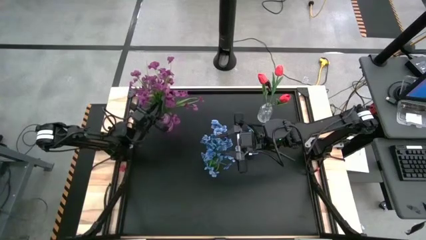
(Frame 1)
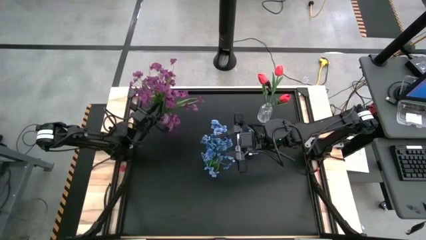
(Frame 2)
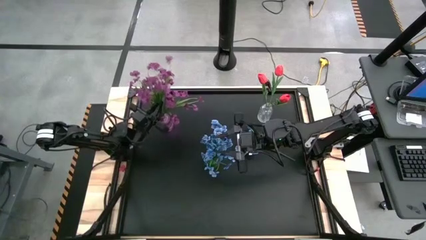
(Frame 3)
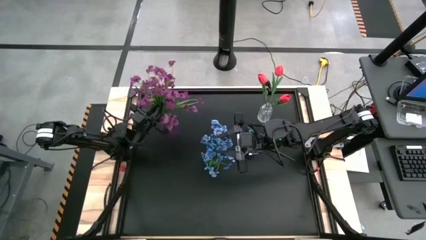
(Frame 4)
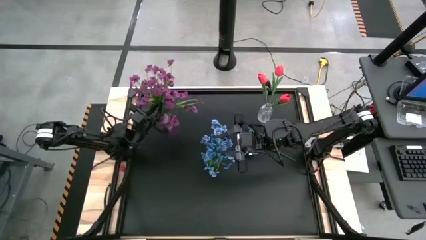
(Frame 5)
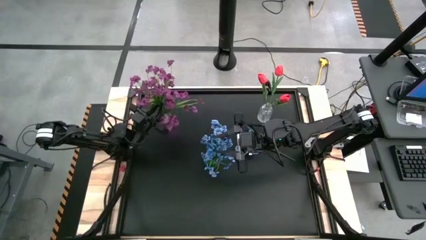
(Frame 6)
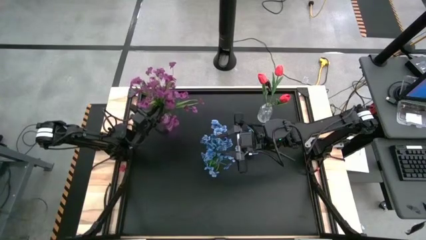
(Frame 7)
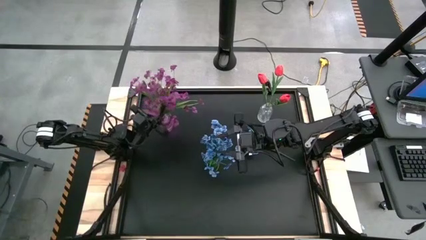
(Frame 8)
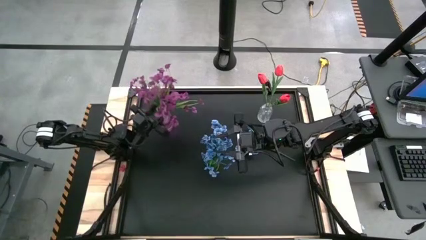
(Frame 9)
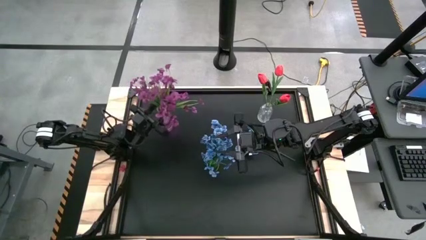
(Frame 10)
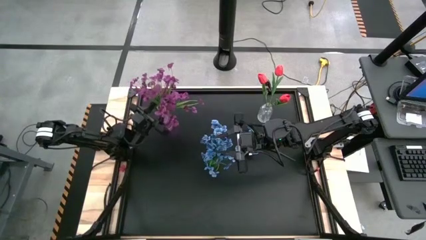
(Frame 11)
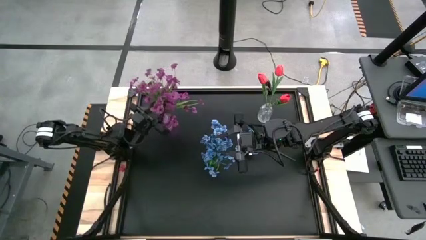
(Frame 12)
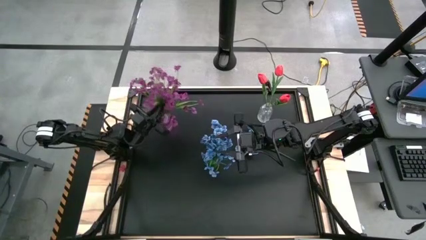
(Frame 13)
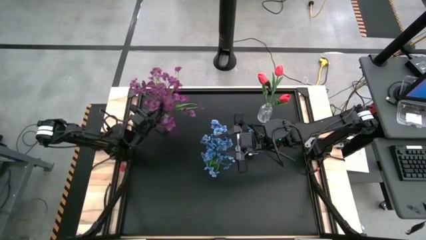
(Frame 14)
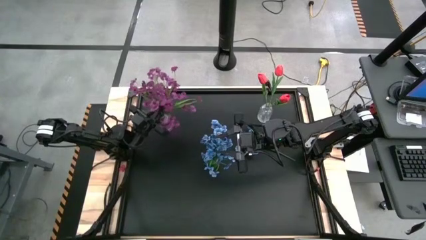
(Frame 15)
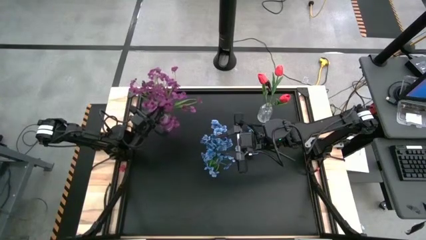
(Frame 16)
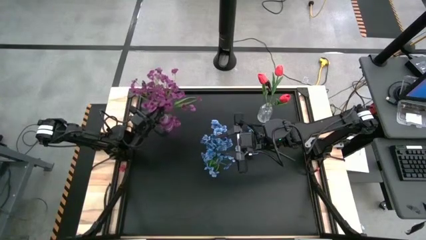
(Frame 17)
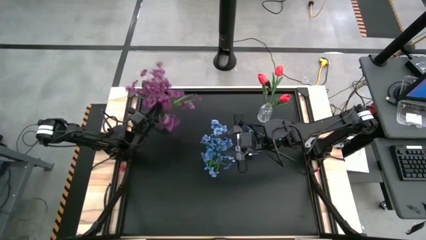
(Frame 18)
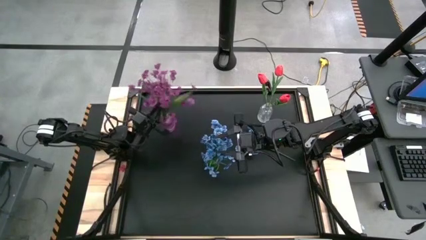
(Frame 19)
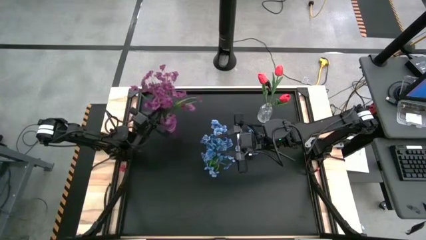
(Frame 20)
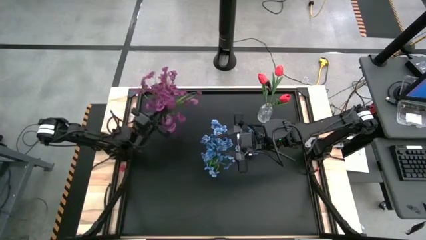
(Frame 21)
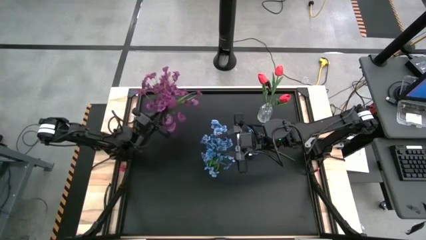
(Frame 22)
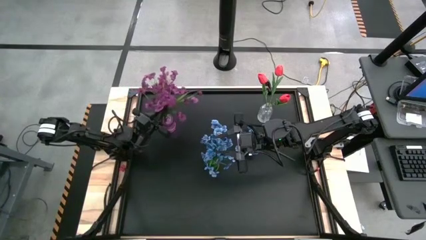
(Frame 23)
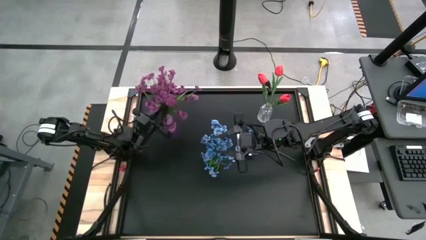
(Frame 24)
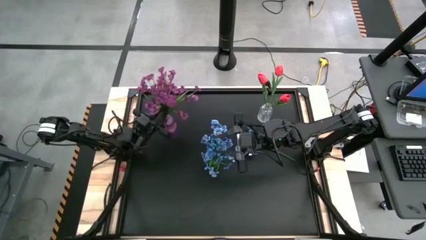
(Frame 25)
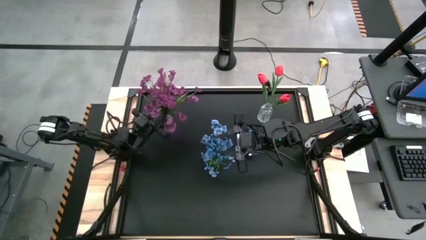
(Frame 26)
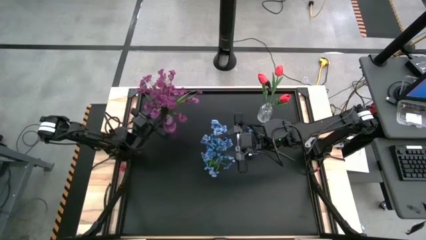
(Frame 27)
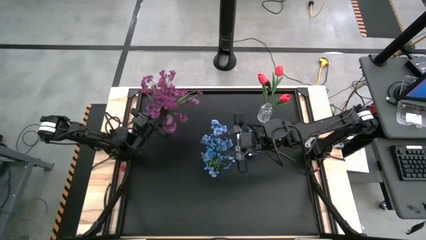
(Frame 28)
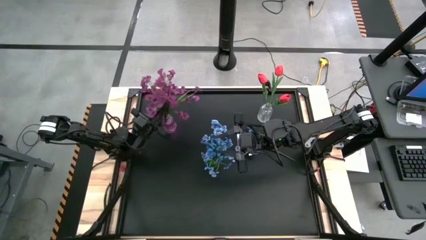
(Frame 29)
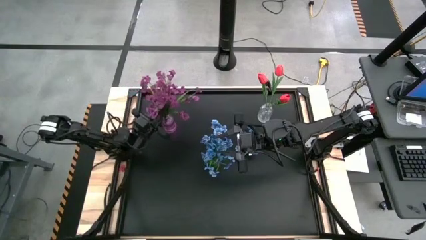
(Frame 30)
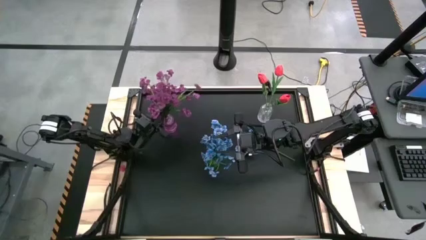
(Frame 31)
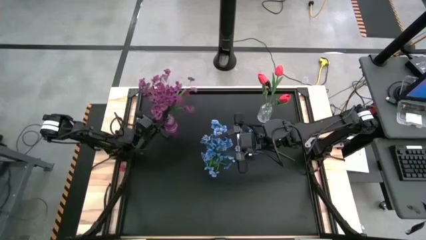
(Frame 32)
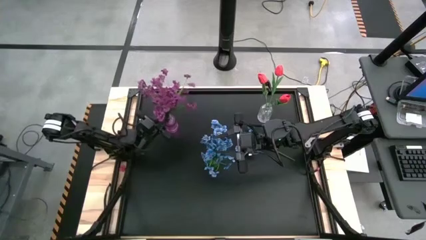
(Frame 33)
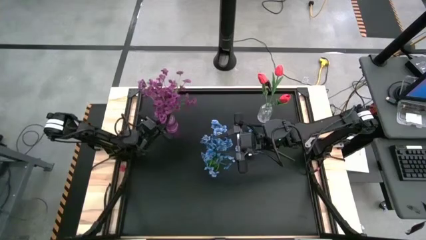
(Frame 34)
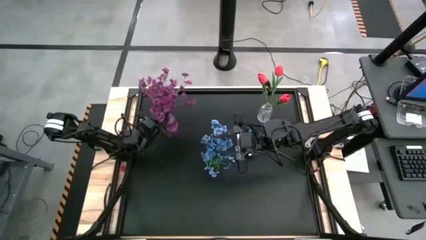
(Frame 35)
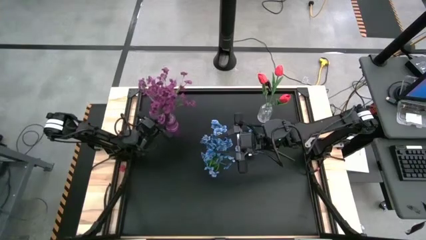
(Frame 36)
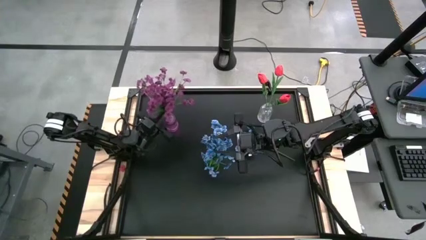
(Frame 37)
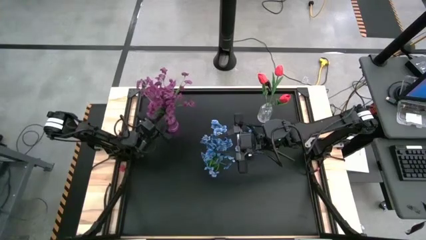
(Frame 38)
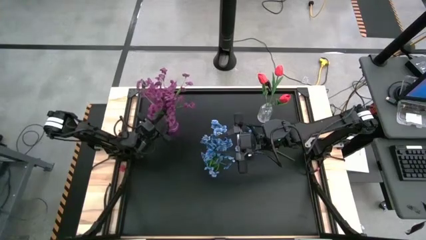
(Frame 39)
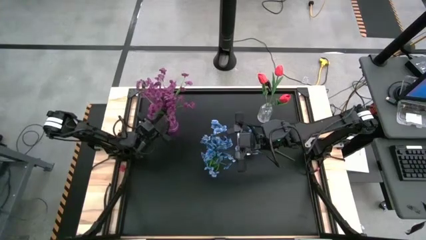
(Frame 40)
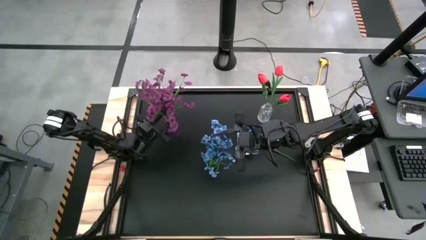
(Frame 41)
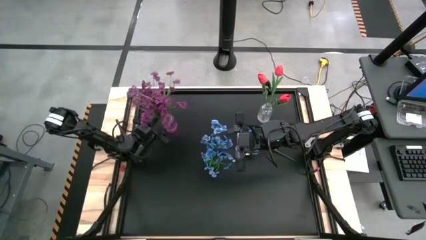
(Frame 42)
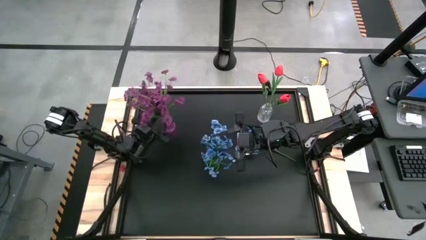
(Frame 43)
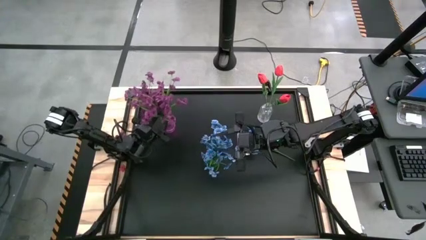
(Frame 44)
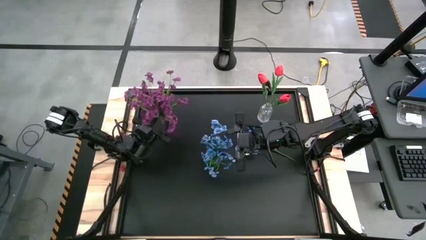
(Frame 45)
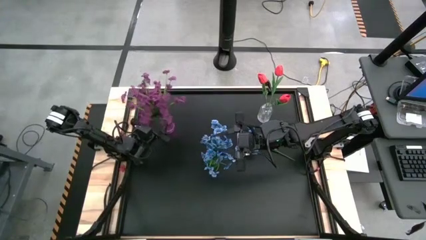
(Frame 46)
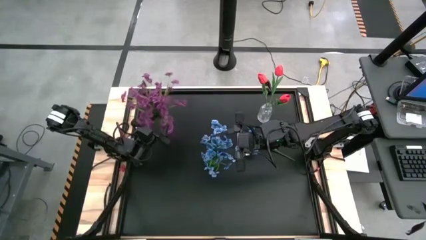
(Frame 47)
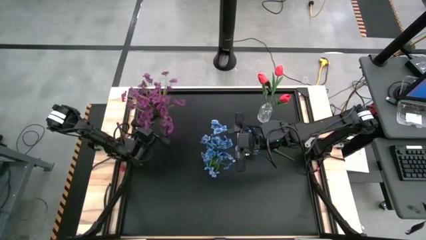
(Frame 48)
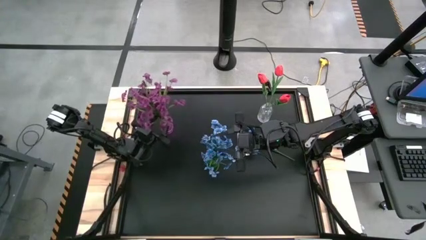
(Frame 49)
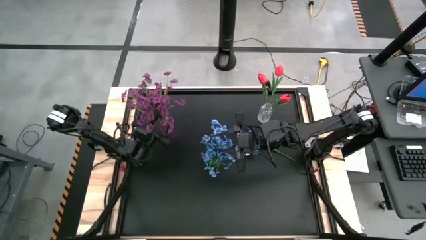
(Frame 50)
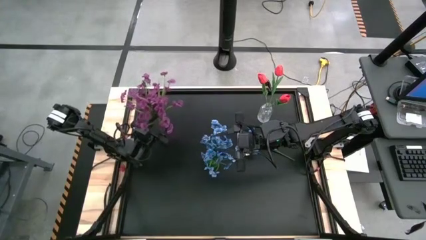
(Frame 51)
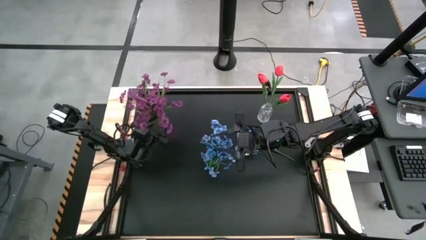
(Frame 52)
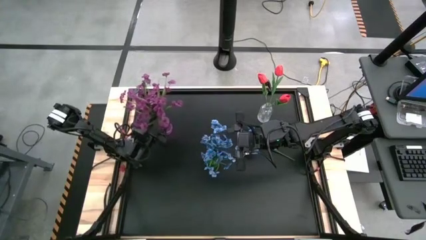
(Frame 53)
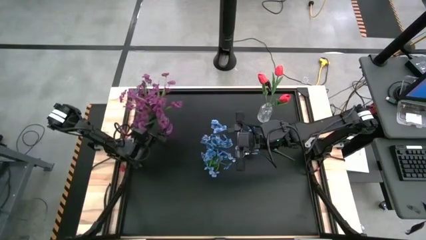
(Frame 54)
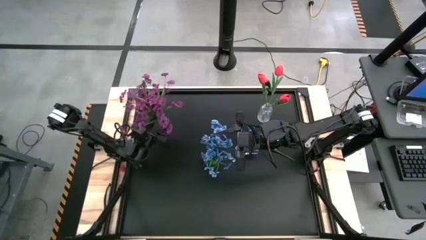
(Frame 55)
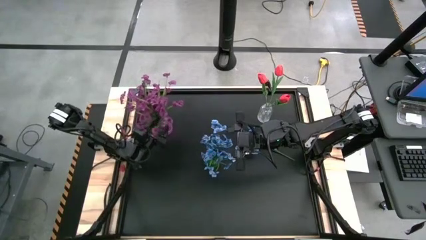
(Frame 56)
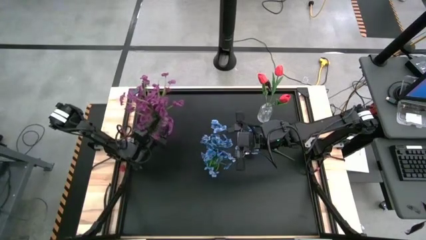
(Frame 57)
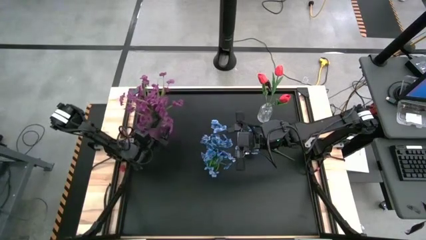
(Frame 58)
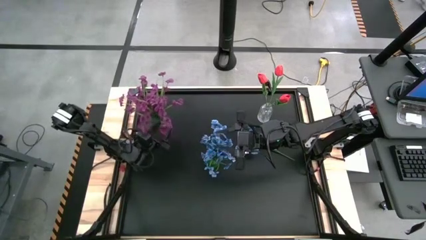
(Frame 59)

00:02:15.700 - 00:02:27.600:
Task: Sort flowers into vase by color
Put the purple flower into the purple crystal vase

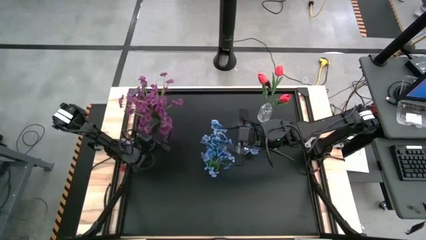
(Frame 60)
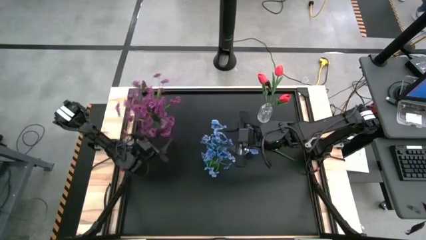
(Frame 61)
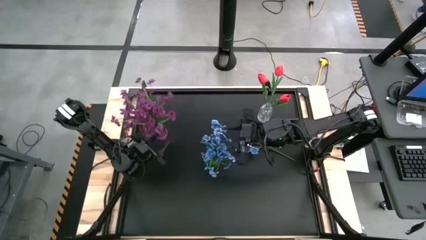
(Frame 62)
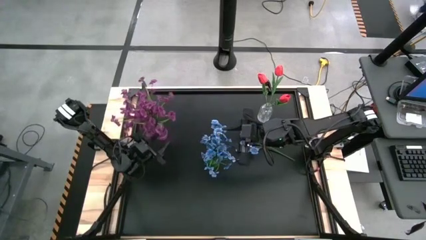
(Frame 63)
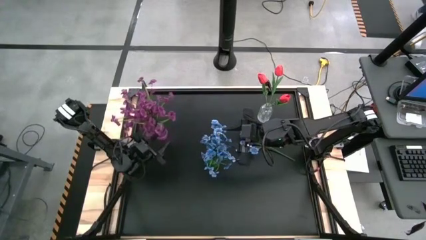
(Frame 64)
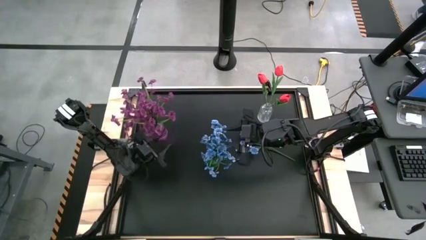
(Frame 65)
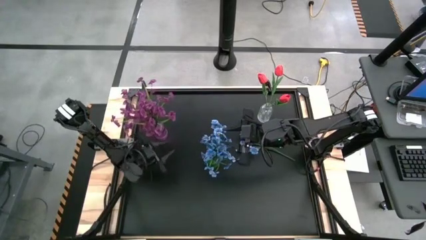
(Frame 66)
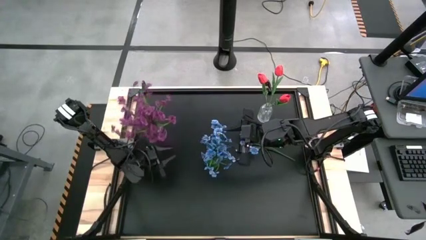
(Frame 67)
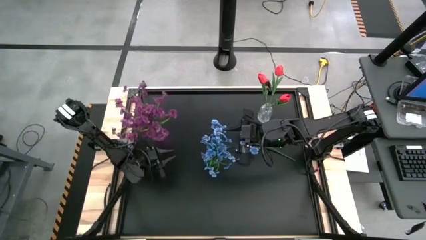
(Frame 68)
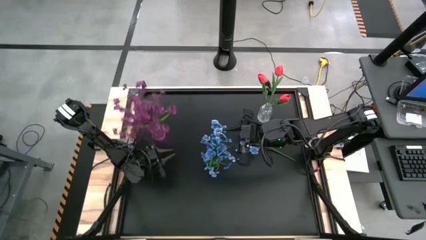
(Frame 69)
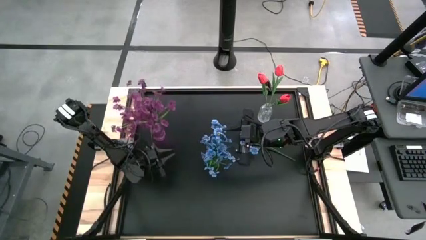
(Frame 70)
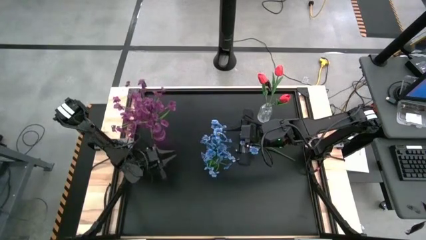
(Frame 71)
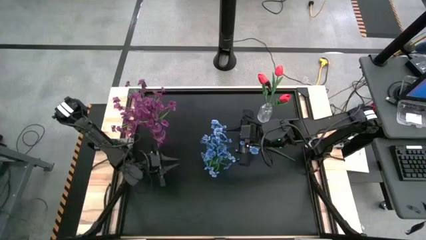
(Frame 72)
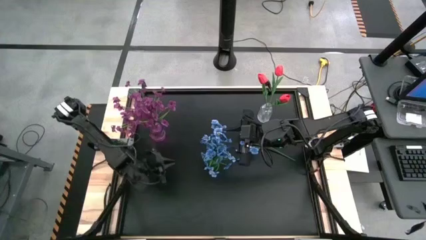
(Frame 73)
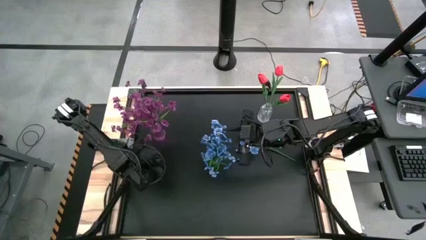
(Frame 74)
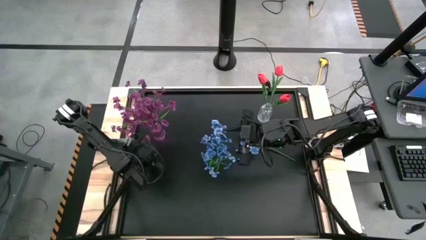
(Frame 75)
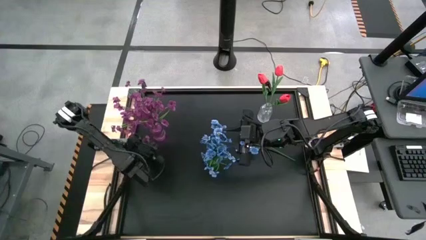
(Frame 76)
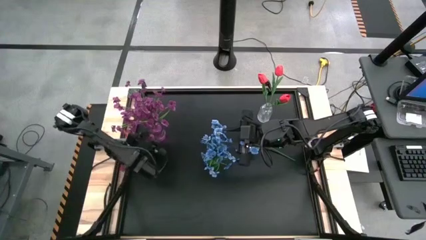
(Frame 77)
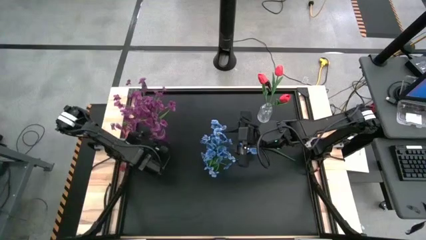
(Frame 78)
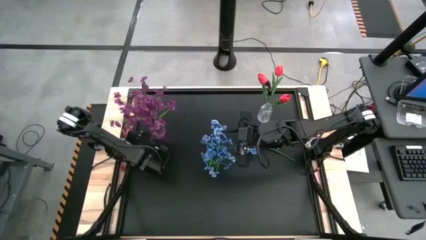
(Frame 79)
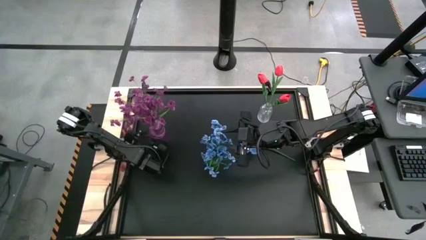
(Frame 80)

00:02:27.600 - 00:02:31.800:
Adjust the purple crystal vase
